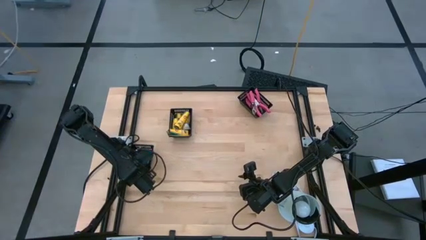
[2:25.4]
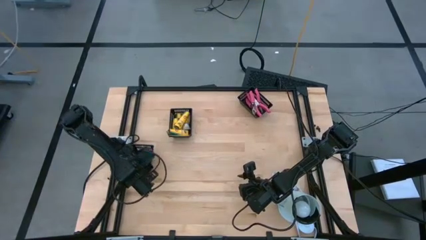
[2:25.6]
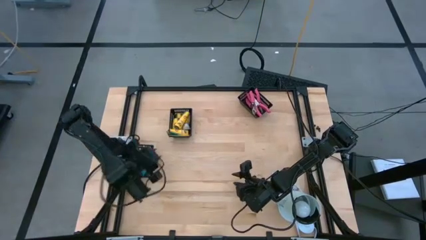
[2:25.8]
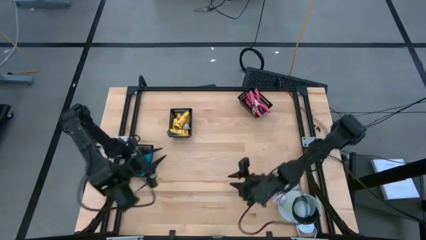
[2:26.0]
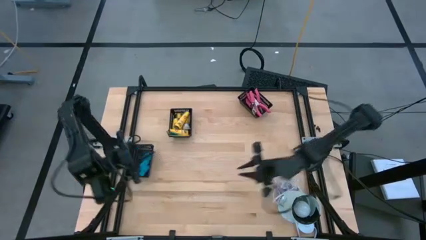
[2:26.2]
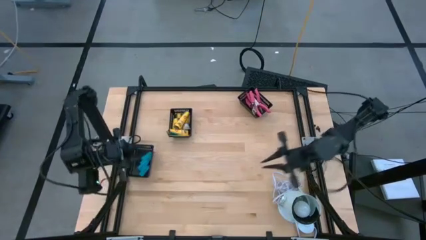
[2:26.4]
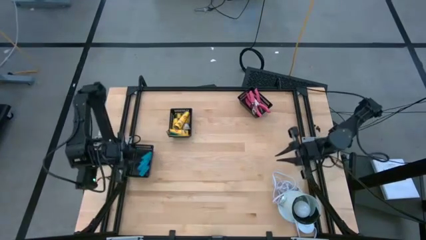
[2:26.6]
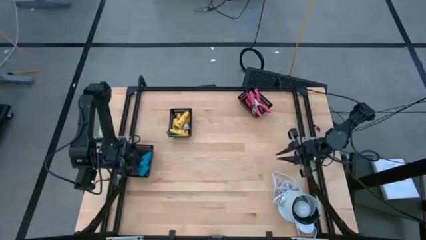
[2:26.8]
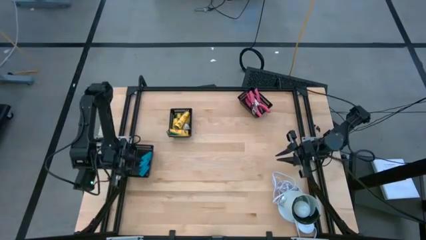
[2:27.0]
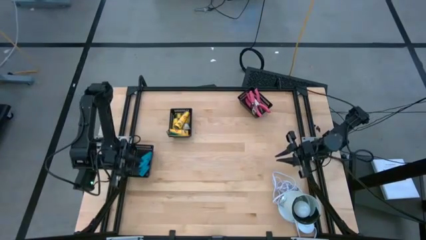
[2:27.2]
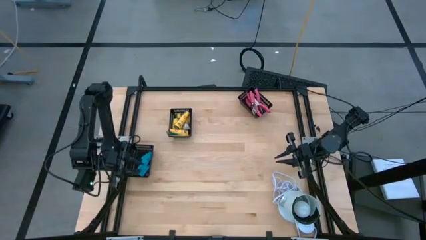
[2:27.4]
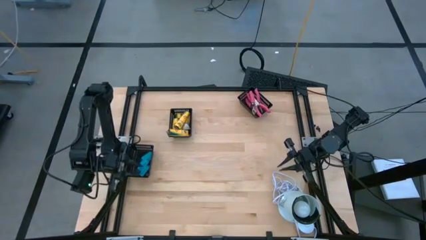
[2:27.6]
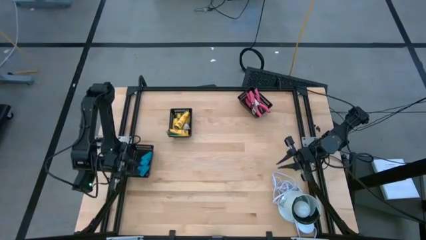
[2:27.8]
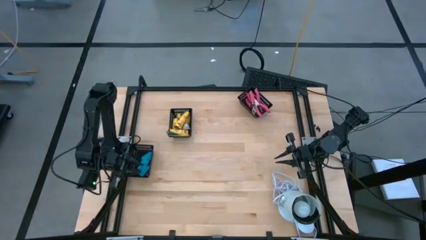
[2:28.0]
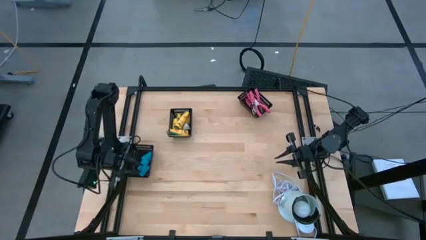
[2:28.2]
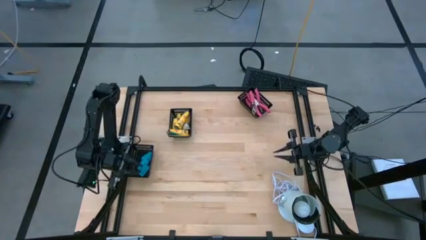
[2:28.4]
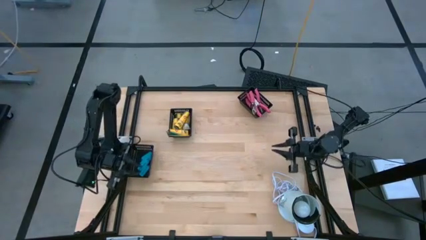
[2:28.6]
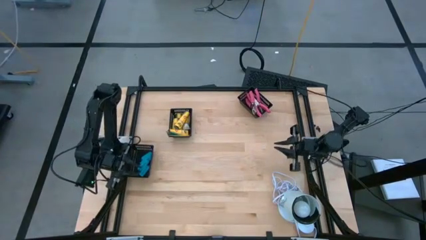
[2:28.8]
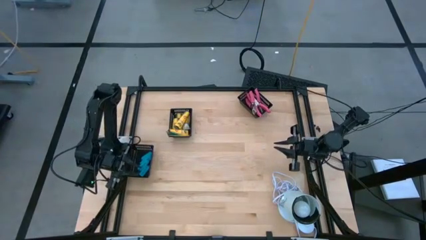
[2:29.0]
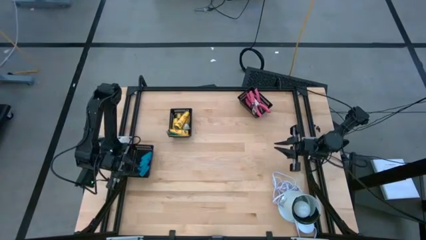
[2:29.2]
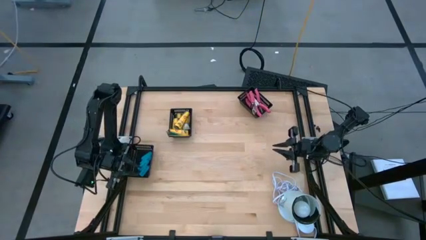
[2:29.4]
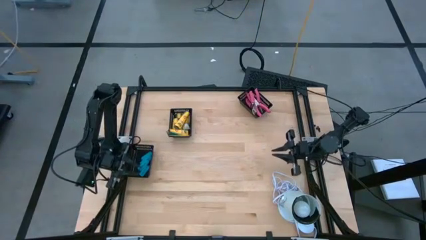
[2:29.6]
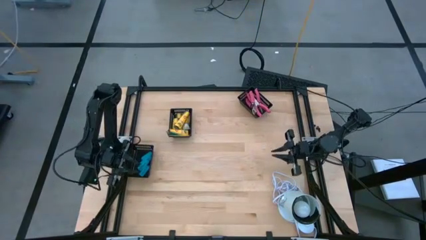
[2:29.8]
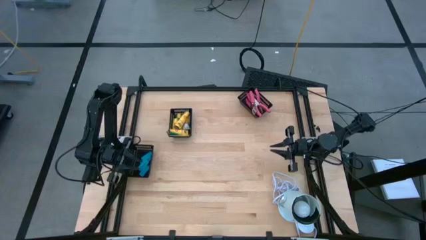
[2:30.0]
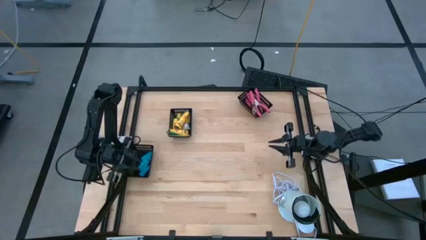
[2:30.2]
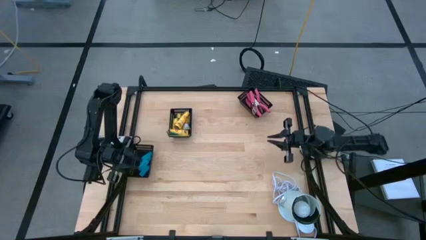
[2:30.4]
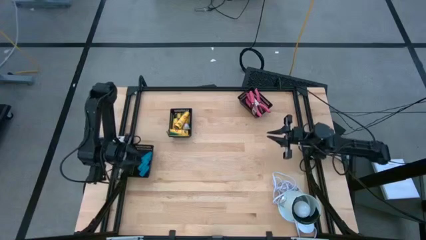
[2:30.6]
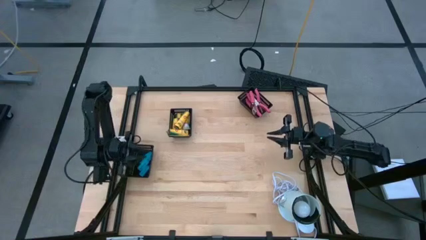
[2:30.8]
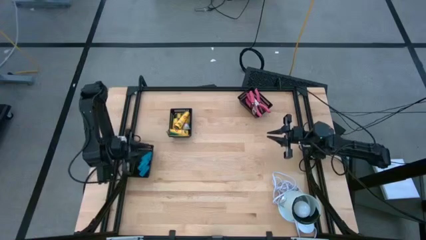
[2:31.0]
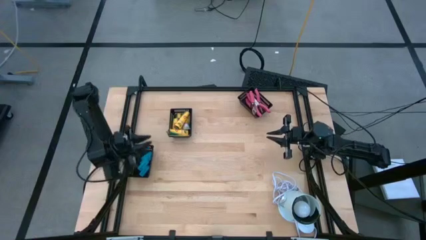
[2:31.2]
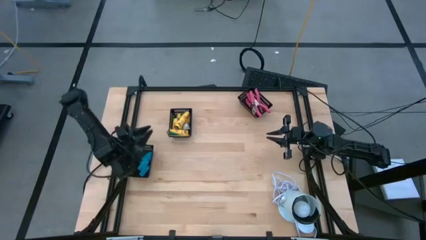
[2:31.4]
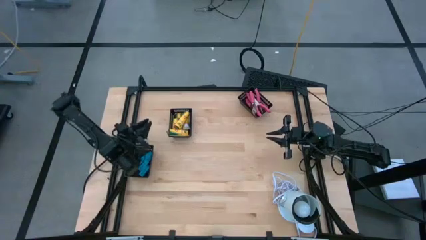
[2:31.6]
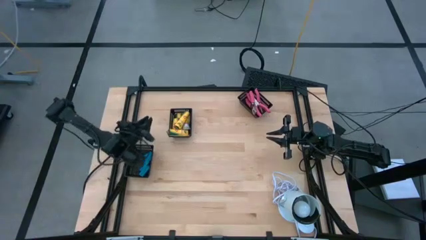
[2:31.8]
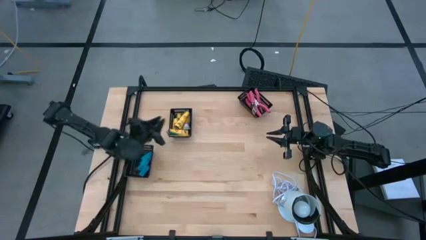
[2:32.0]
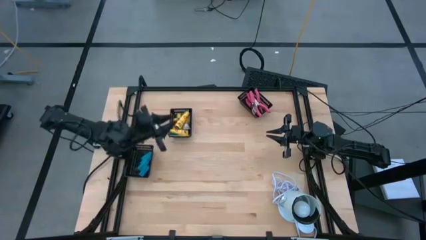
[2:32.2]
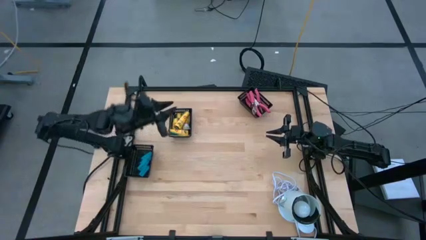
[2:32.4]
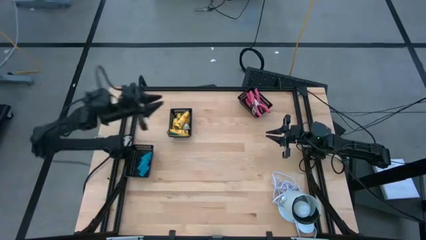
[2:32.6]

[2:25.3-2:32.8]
Task: Pick & Place School Supplies
Return to Home Position

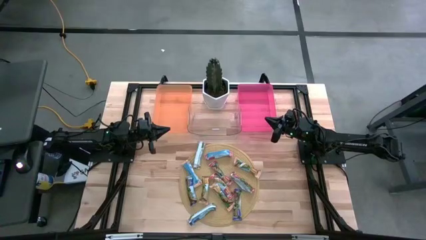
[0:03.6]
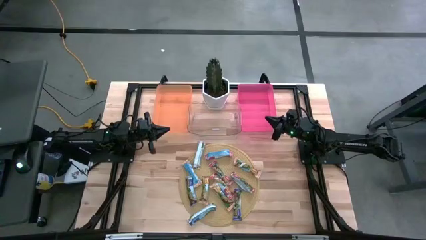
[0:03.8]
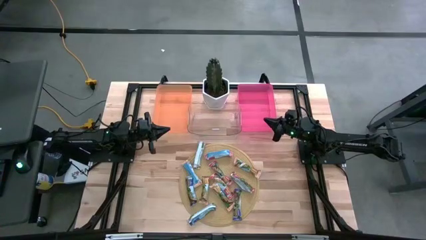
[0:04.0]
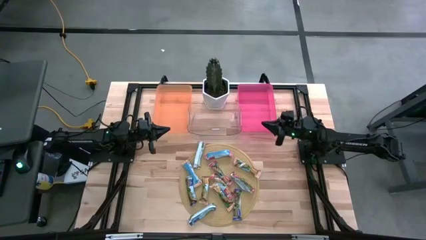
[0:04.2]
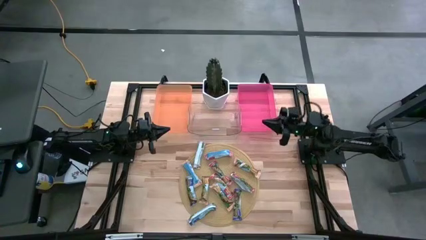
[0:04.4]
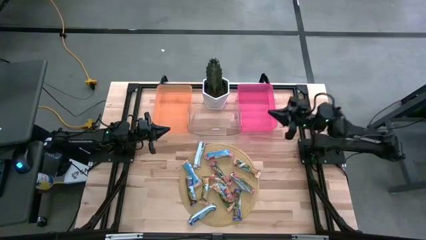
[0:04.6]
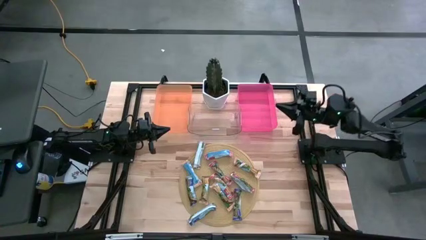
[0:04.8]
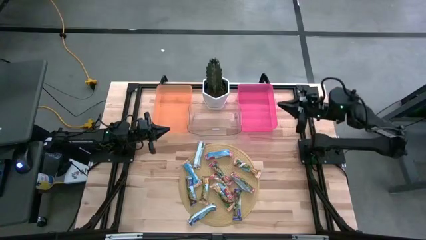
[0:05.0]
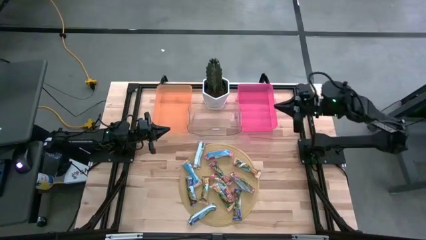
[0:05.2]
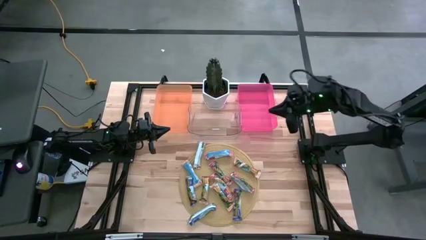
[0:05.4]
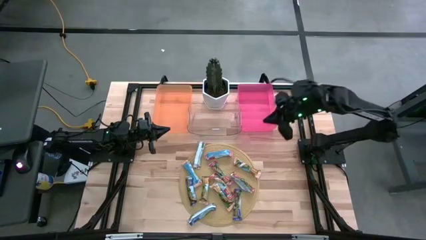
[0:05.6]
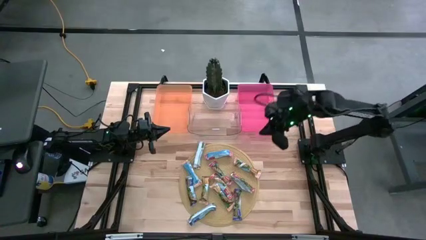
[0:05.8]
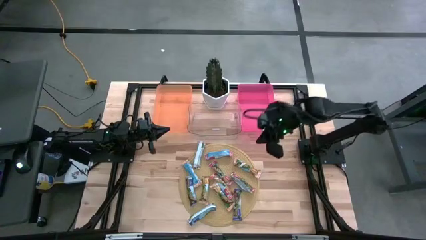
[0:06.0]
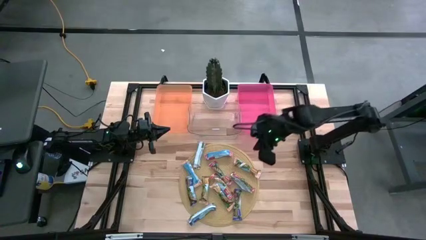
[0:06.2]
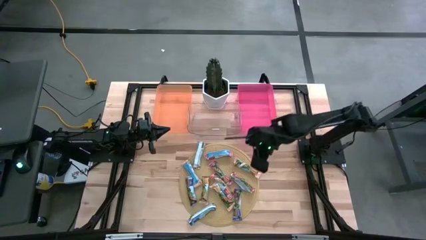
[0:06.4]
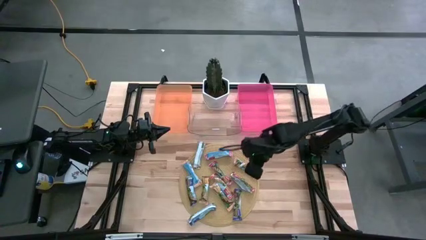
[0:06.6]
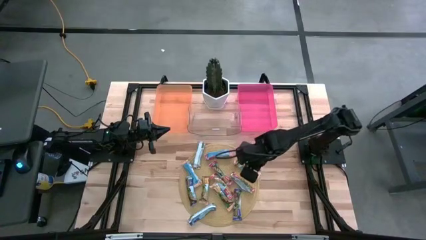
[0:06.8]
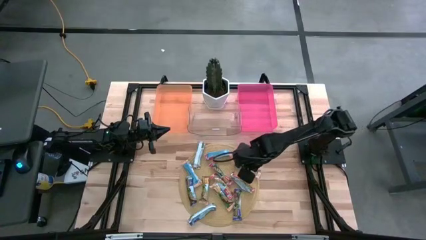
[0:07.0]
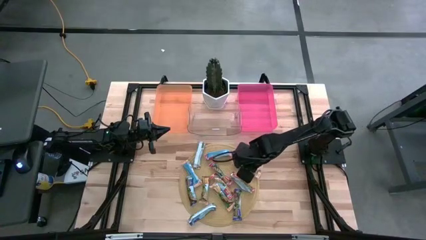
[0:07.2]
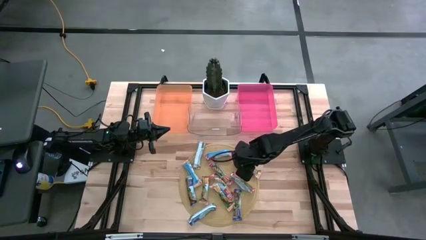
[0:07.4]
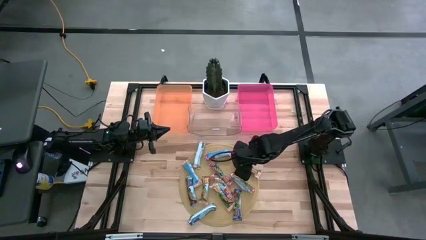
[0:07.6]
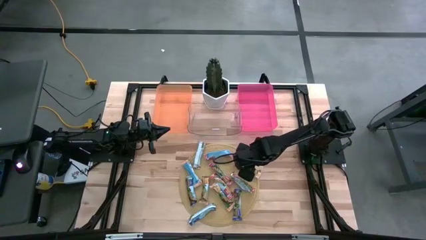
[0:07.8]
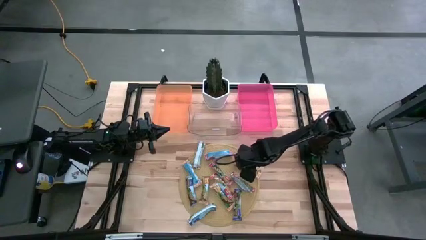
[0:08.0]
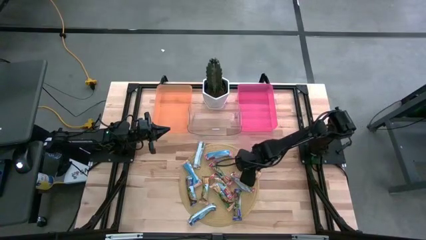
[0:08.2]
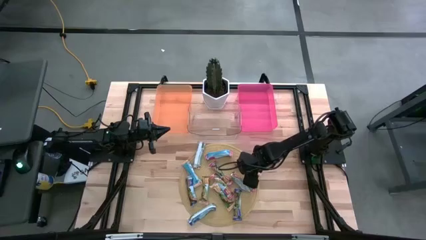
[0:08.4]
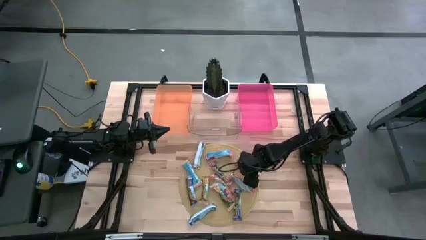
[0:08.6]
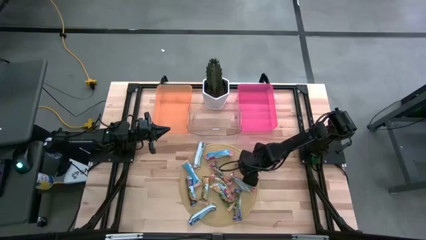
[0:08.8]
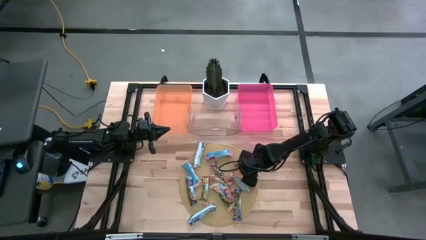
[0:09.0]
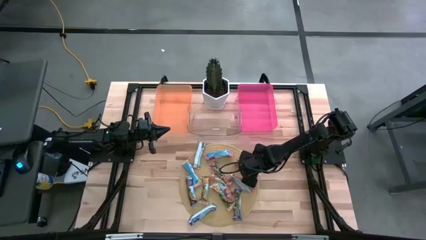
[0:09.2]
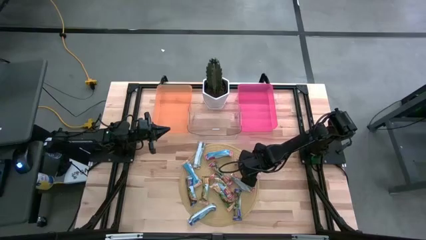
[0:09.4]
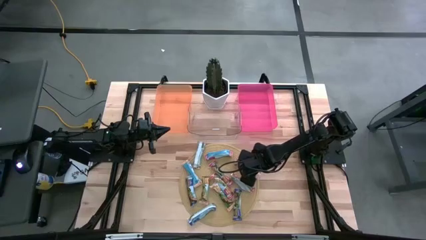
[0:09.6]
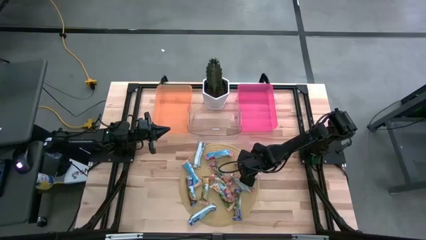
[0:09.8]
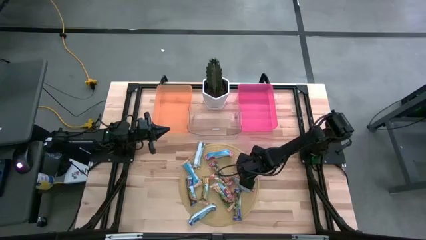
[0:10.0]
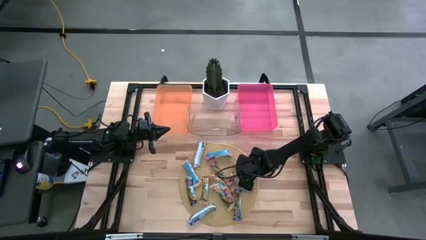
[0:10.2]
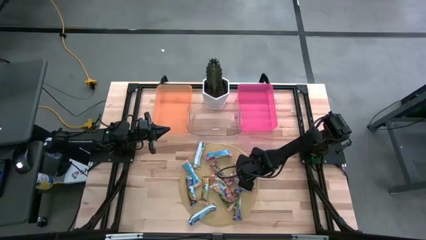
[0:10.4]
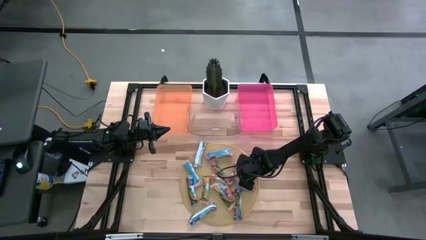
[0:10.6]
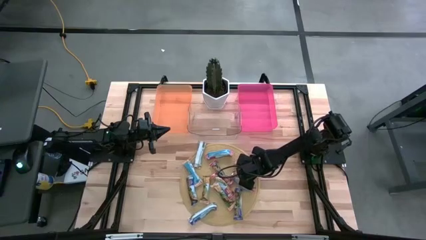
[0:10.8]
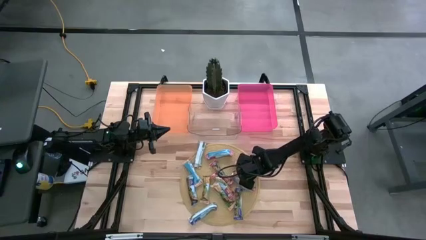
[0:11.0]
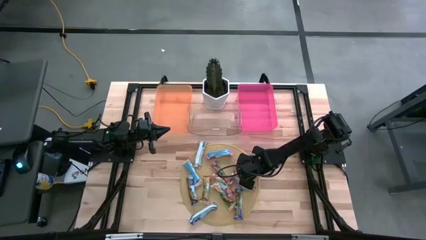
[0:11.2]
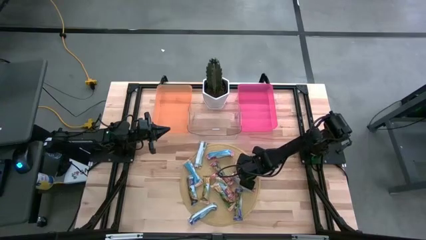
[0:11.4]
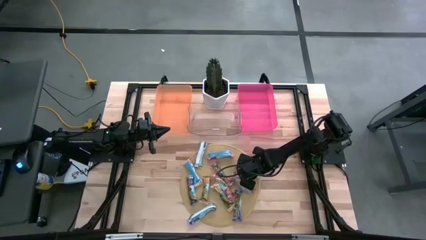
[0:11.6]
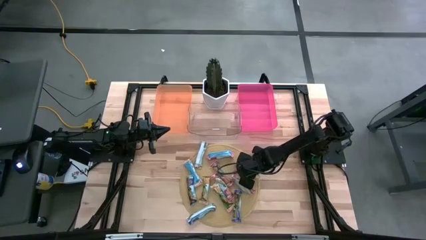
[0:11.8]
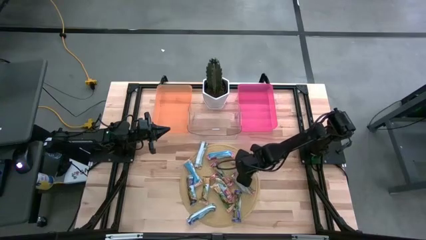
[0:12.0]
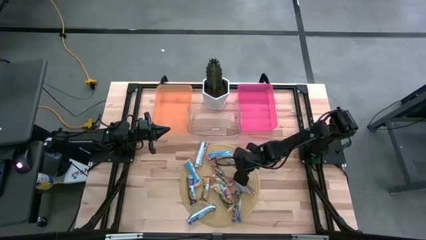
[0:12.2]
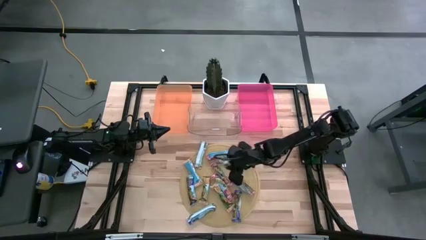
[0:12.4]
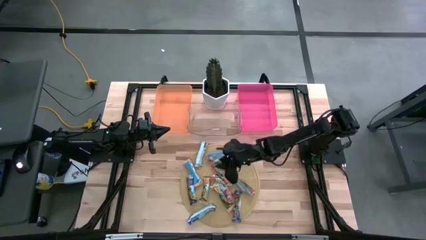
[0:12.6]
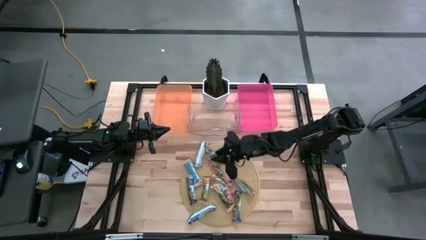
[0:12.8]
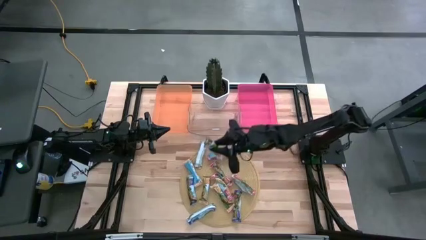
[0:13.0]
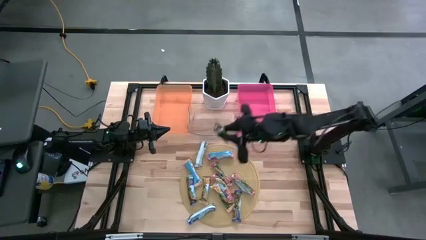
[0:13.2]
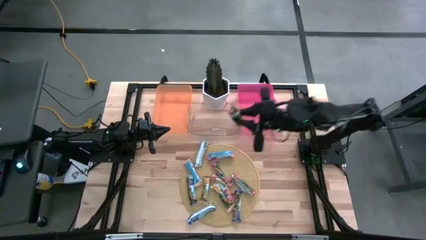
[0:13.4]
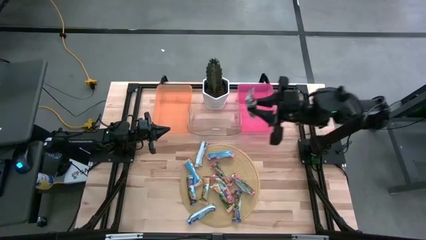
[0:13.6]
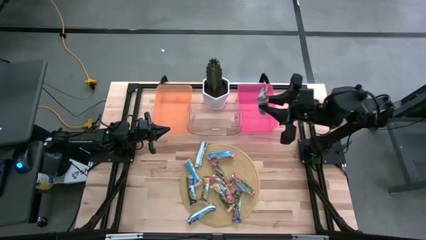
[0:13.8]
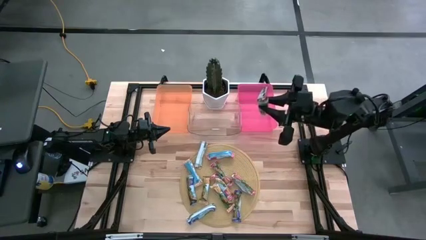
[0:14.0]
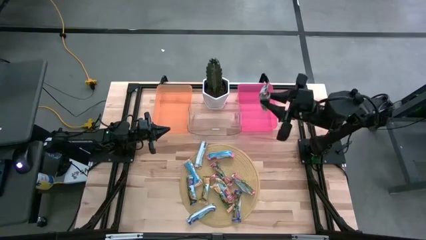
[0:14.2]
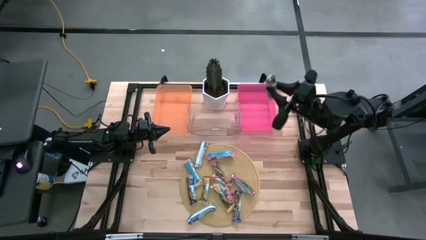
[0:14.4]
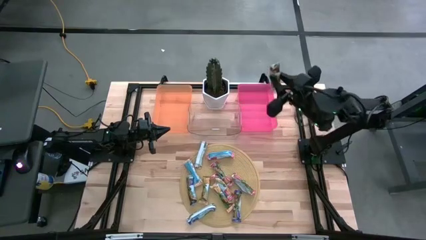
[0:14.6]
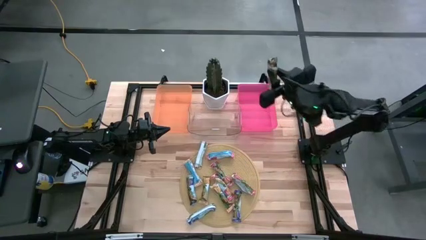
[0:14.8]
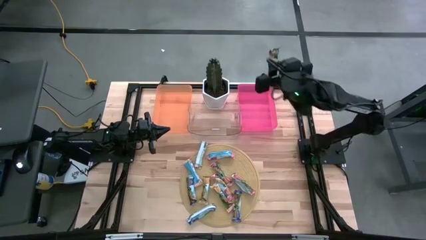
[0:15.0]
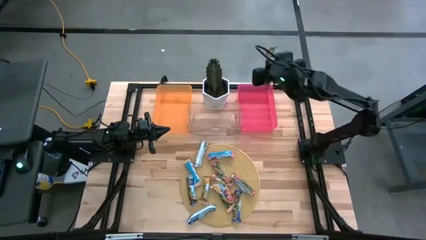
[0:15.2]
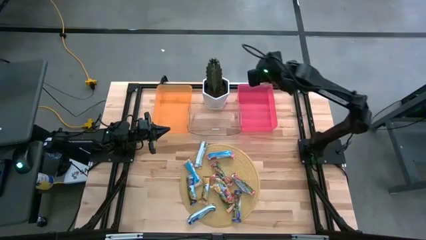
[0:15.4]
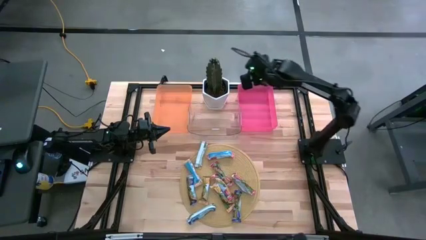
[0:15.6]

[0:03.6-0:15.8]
Task: Pick and place Granola Bars by type
Put the yellow granola bar into the red bin
